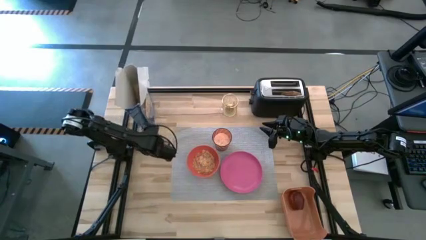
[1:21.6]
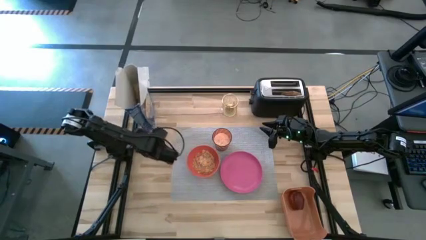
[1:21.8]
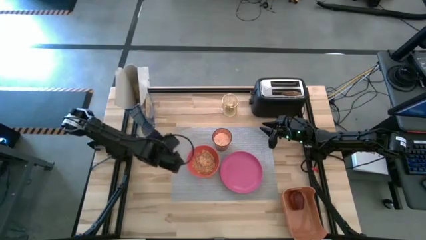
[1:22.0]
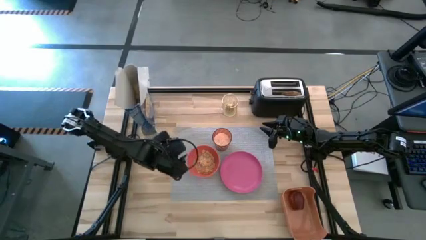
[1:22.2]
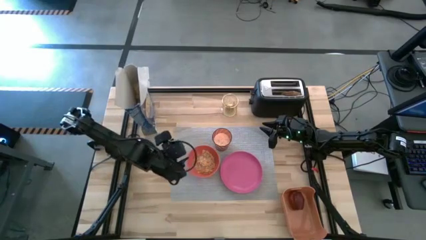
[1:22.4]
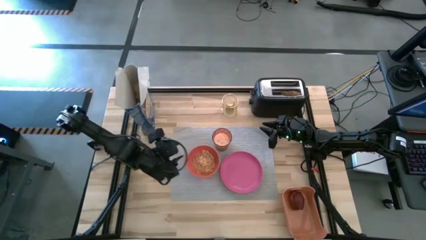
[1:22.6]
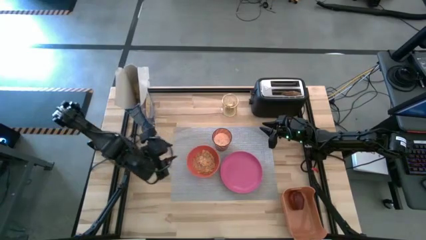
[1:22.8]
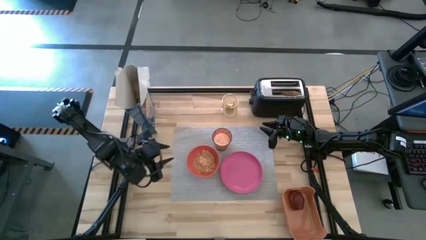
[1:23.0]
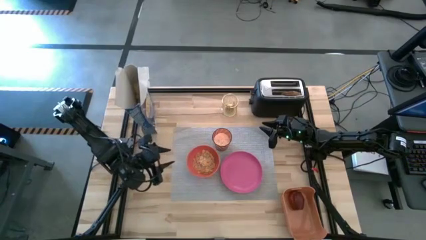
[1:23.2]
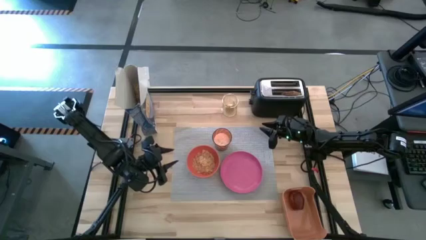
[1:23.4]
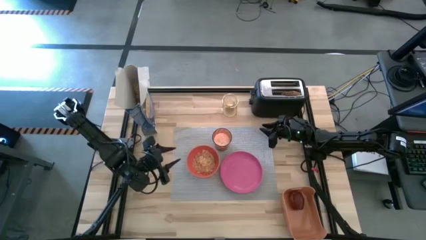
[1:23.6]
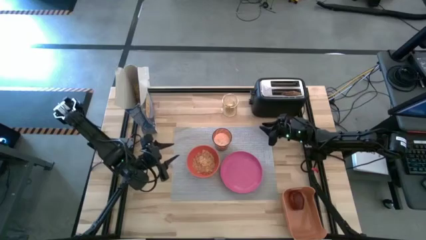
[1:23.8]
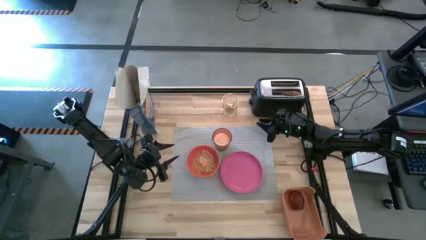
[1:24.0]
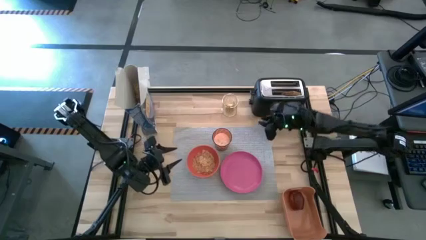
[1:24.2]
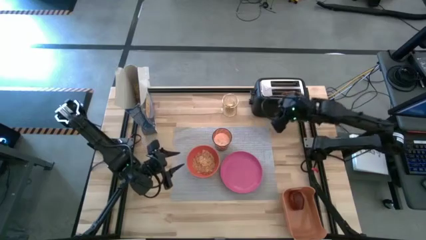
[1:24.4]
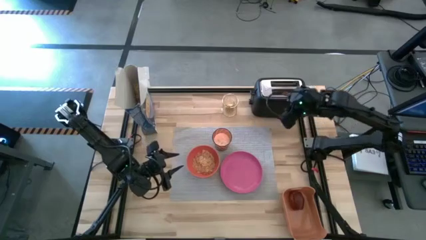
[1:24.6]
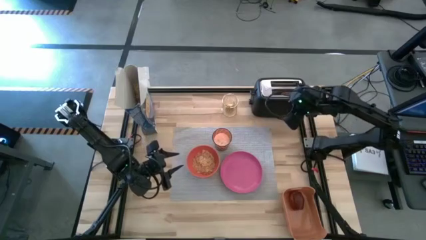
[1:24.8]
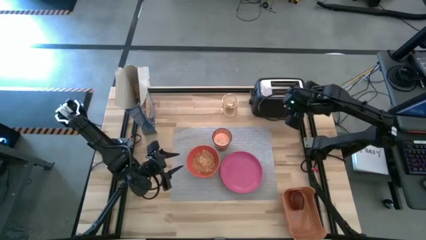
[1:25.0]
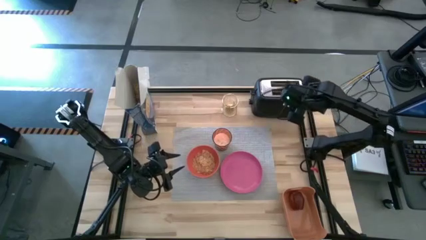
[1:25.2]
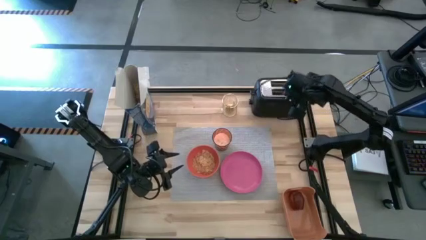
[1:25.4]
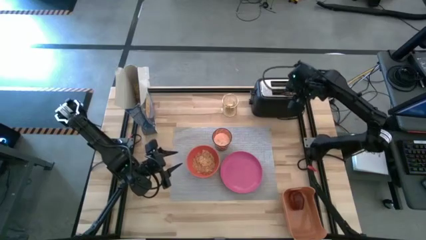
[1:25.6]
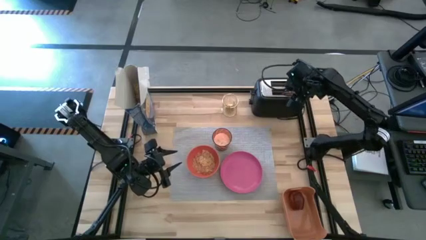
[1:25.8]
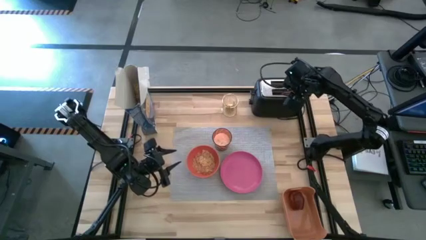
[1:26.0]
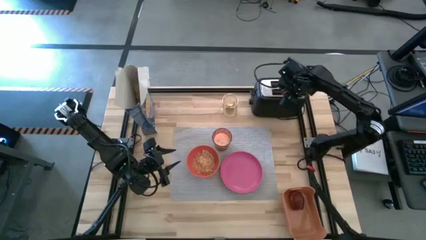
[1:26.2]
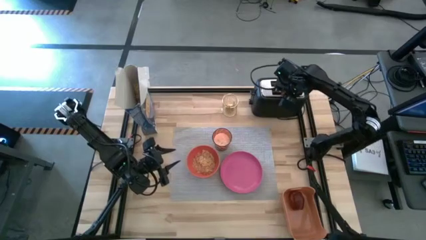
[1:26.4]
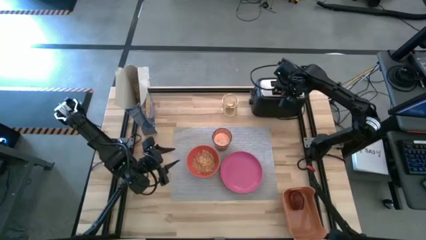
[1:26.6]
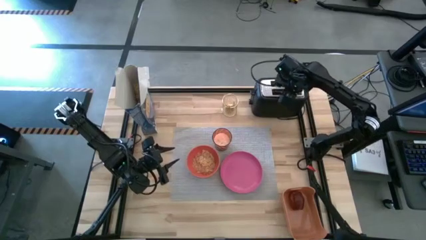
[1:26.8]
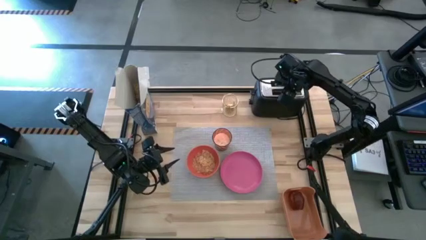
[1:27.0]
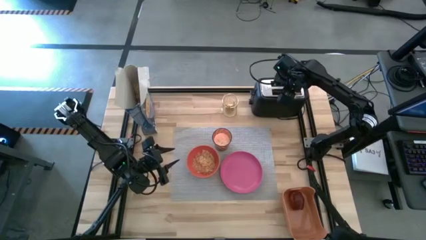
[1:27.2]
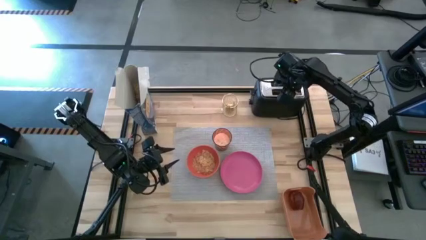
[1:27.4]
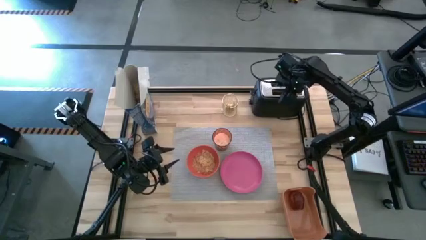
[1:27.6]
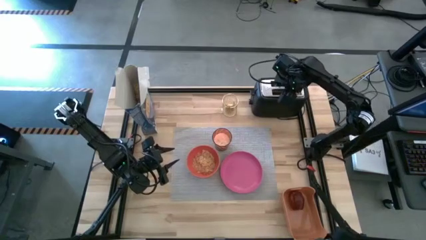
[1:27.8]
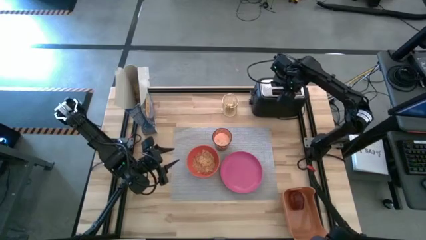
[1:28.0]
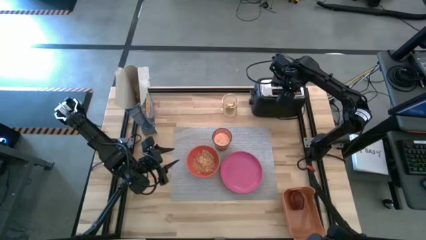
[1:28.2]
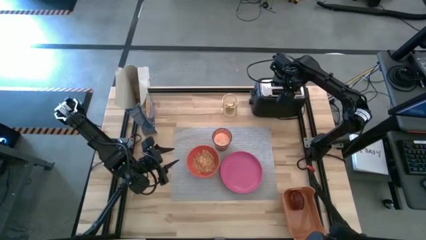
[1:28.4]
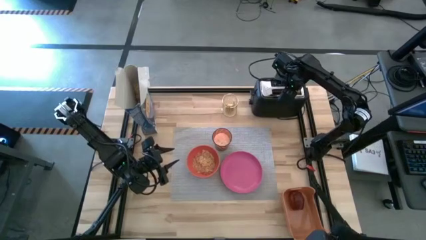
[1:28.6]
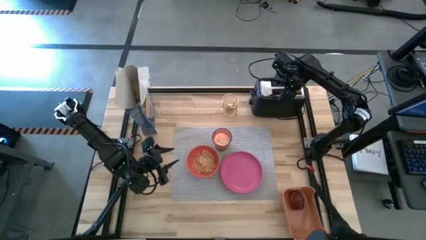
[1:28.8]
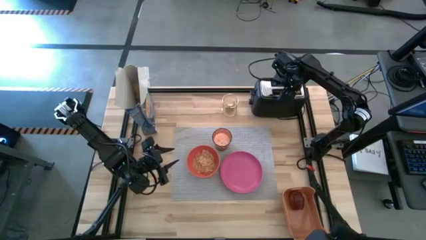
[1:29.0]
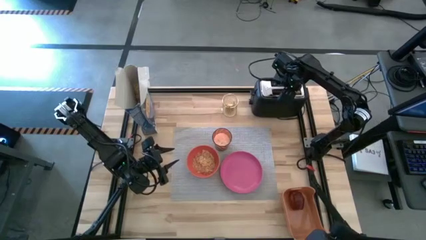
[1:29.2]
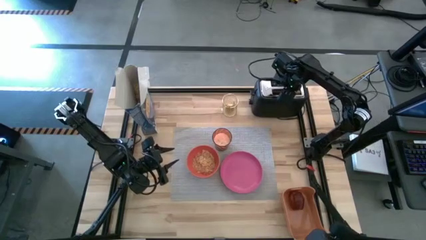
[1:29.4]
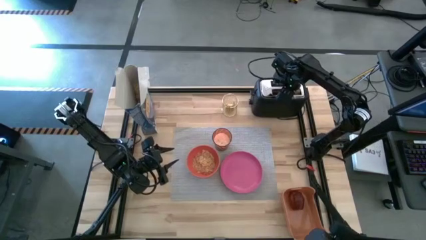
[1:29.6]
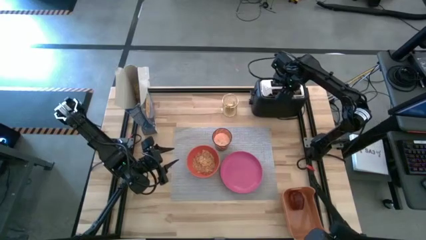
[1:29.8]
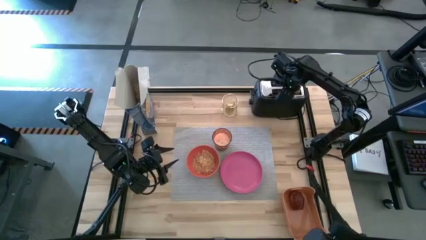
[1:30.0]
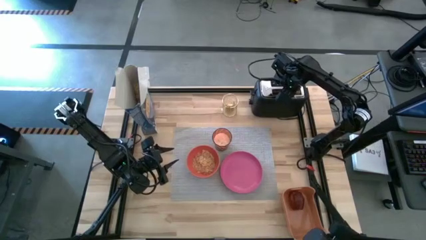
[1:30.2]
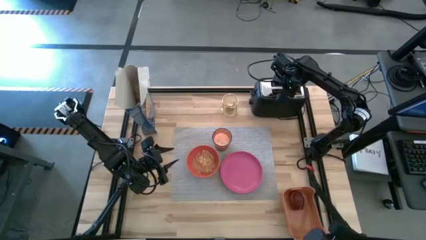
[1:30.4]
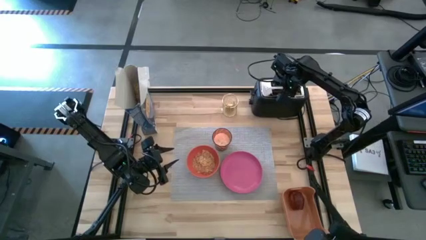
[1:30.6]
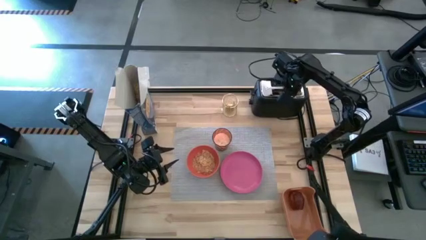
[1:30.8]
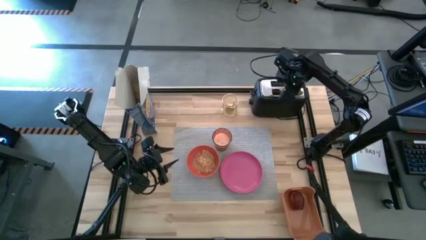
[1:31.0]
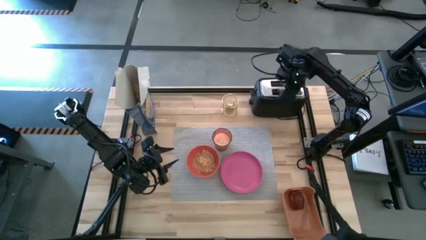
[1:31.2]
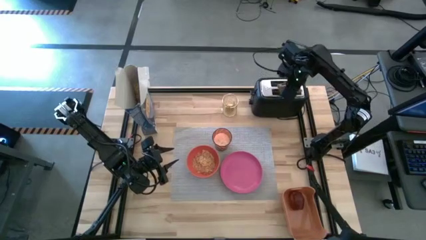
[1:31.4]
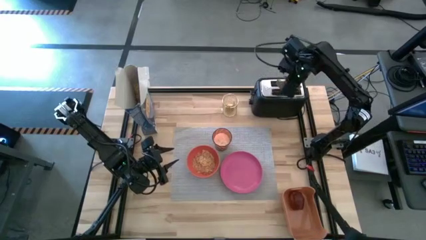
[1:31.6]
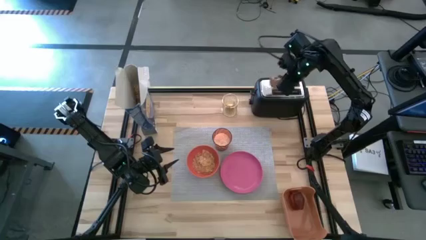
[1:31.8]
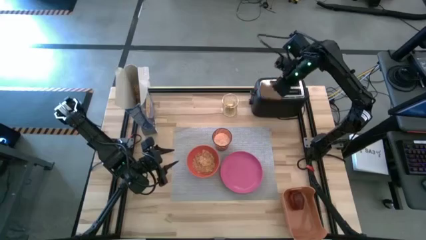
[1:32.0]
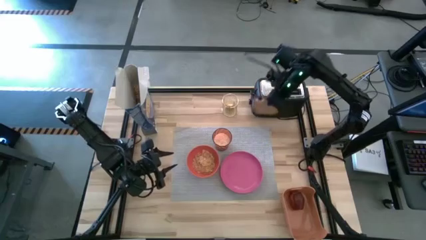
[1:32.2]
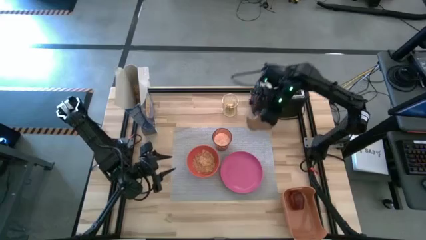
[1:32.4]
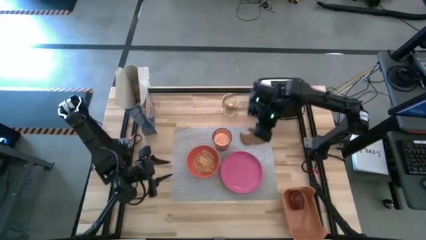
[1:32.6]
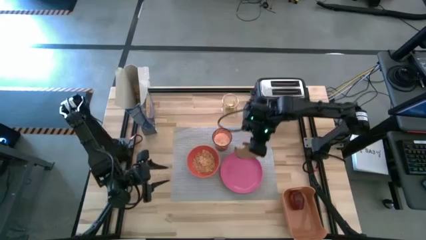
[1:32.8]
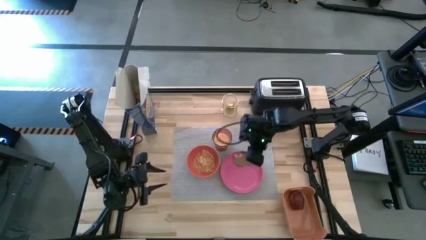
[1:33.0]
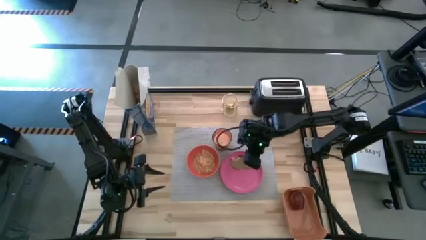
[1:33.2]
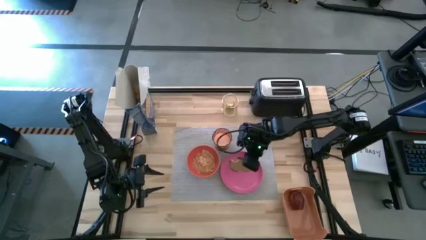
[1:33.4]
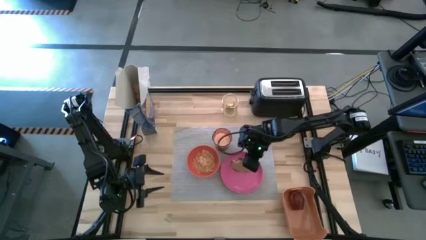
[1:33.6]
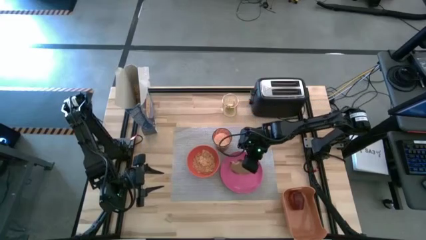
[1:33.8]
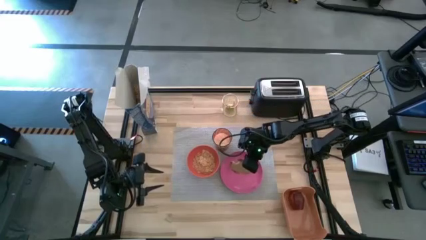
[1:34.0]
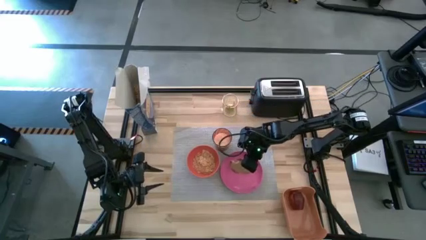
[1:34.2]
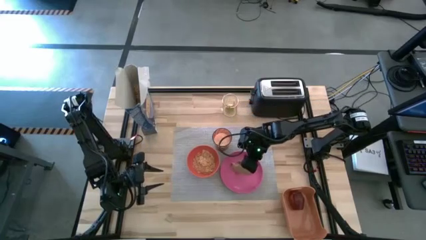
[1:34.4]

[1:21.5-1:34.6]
Task: Arrange a breakfast setting
Put the toasted bread on the pink plate
